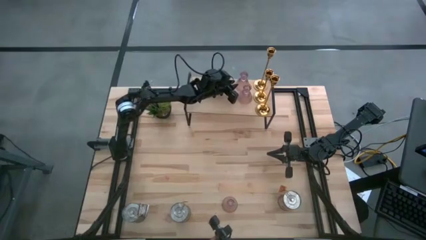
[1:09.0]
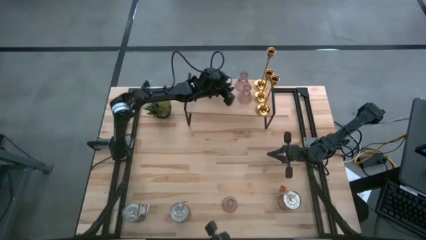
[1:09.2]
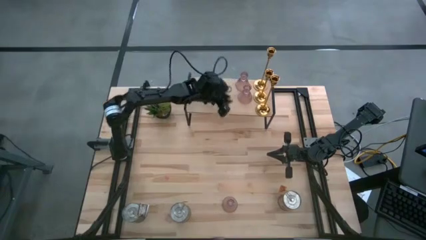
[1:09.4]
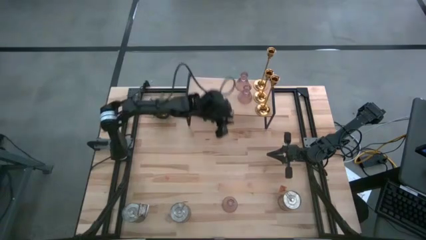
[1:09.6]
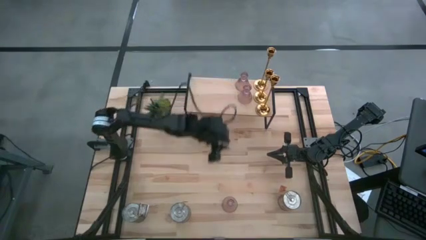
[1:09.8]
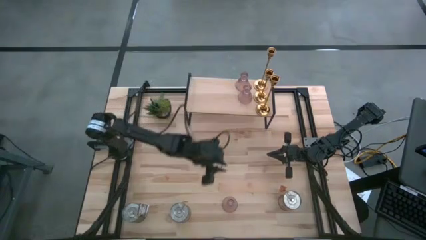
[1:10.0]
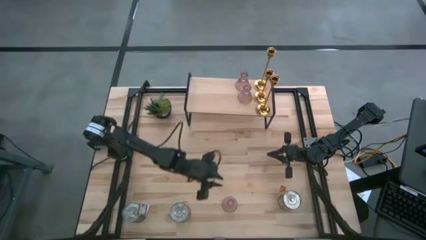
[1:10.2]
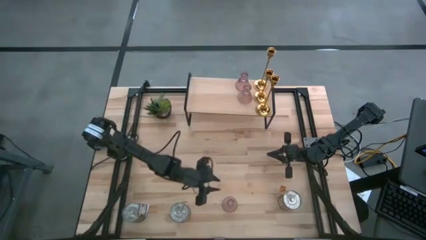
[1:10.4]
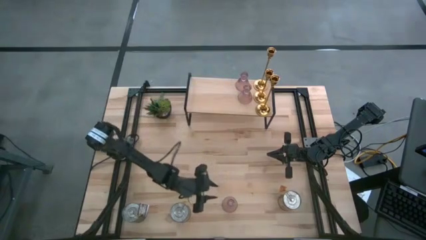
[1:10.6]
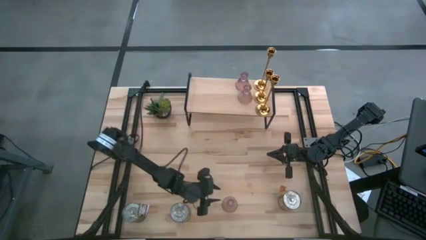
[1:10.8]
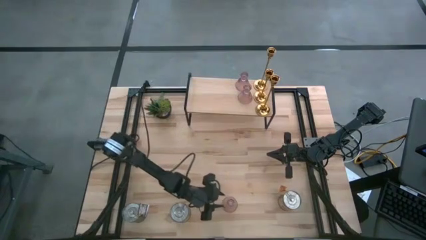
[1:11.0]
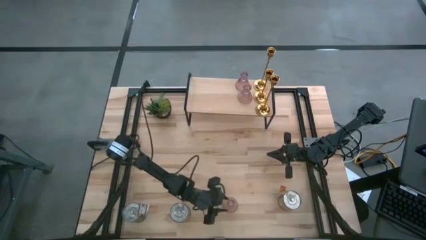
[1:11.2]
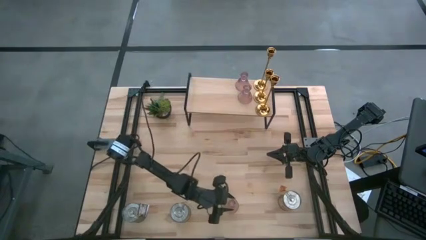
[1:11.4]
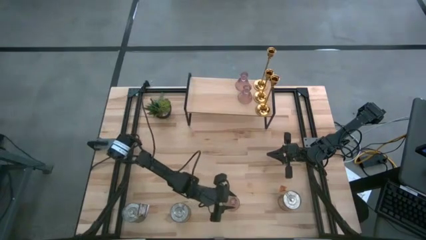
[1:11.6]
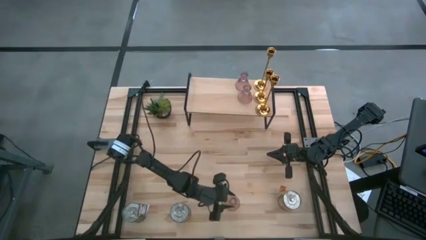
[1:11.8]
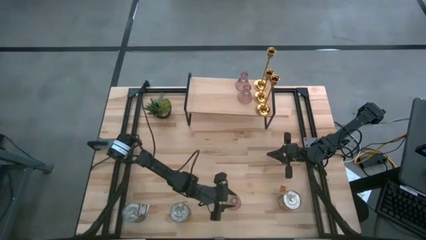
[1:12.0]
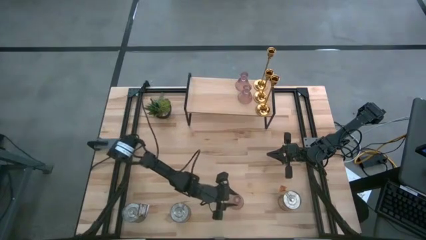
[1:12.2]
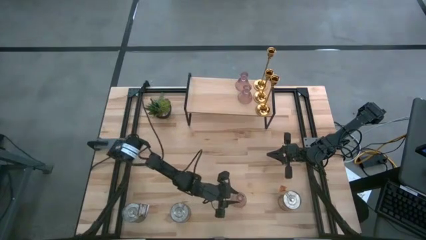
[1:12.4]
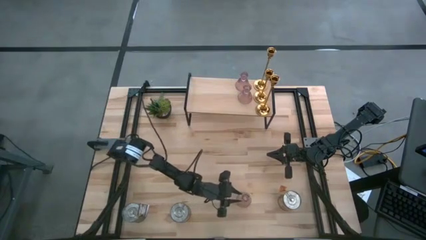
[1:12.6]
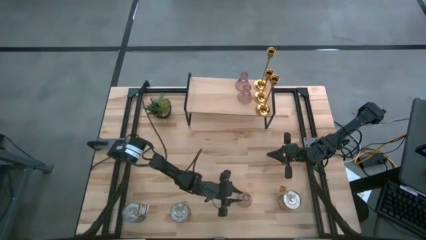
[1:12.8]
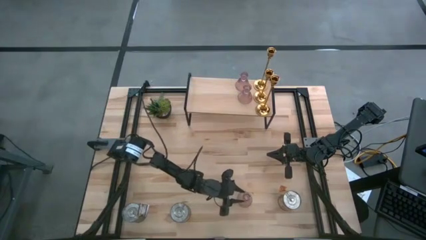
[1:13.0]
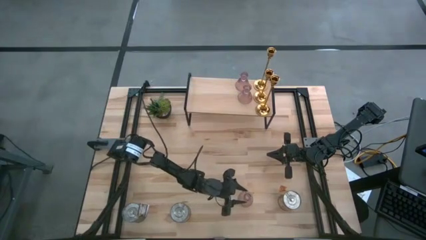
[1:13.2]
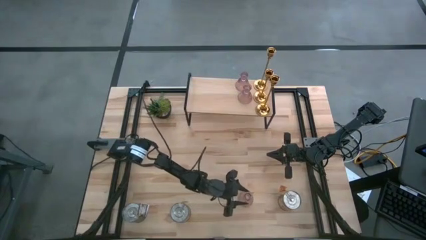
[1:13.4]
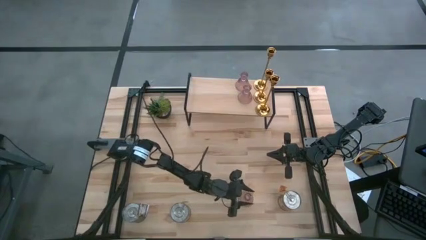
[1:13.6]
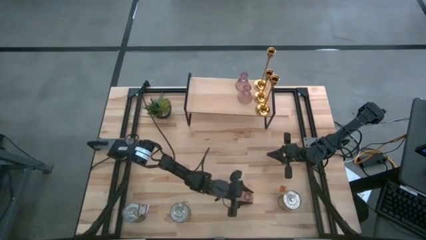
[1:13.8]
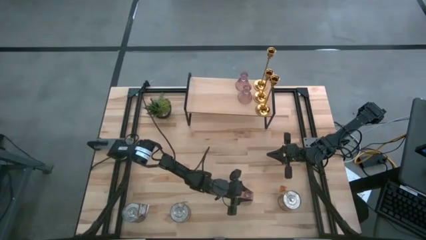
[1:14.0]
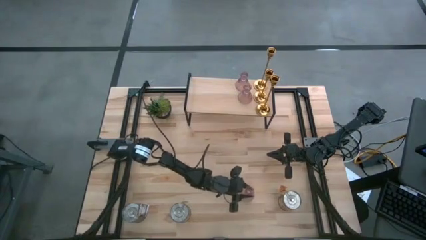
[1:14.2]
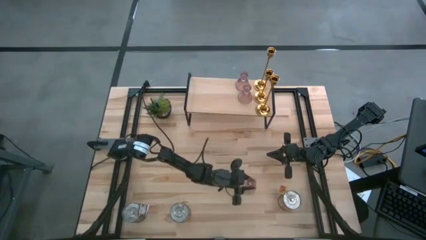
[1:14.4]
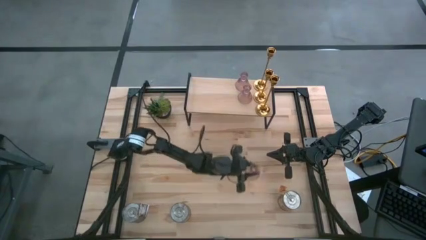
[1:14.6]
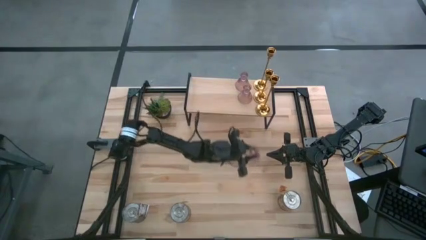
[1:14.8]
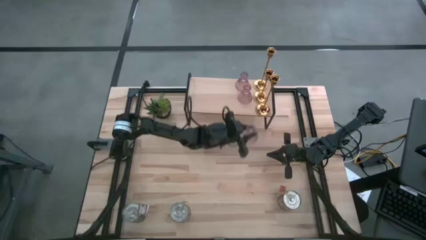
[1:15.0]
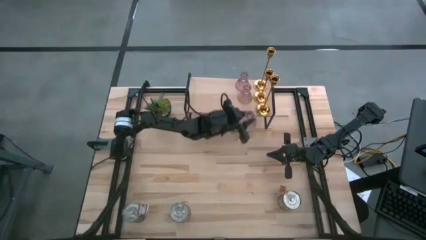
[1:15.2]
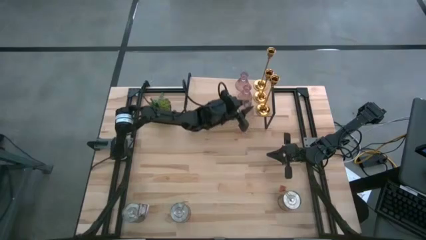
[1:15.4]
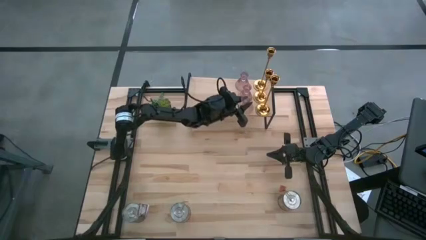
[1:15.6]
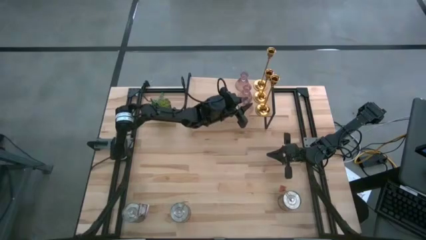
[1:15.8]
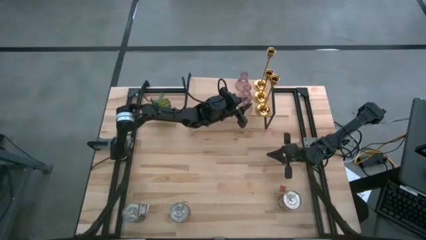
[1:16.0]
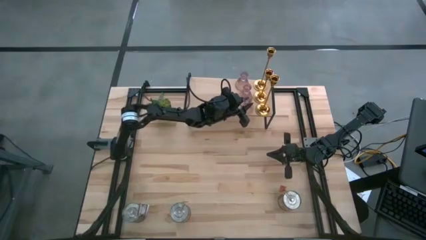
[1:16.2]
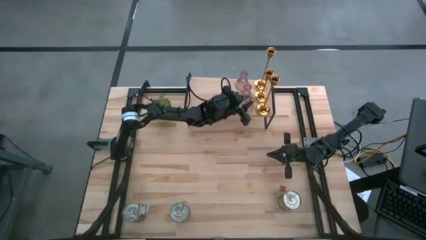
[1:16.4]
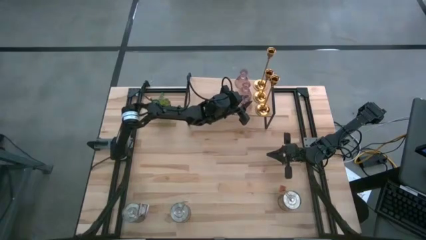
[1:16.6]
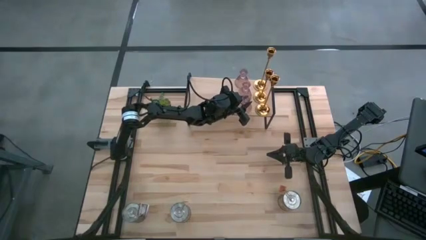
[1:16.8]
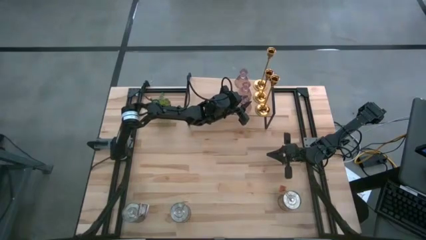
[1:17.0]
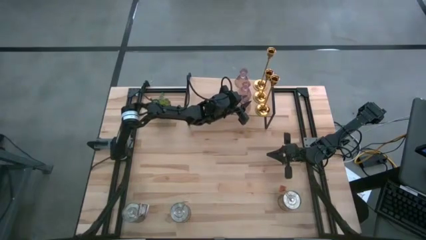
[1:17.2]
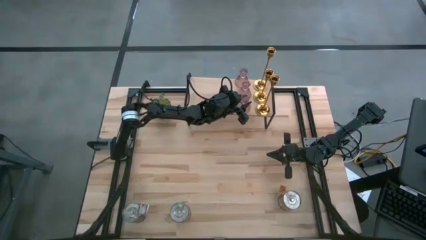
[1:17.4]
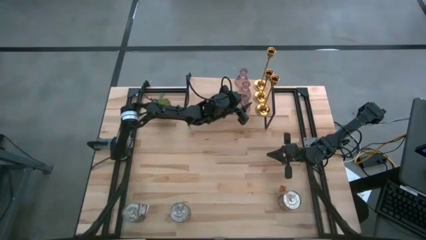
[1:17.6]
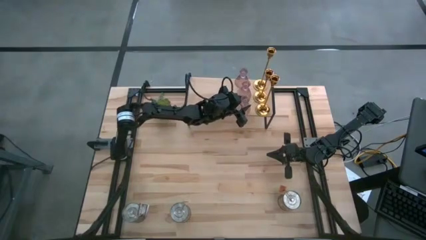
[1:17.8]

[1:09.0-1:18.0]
Task: Pick & Place candle stick holders
Align the red candle holder on the shelf with the red candle holders

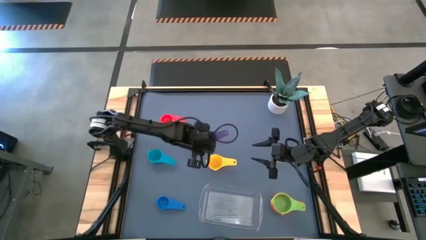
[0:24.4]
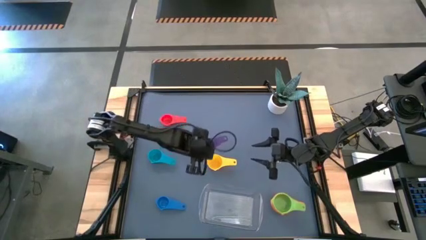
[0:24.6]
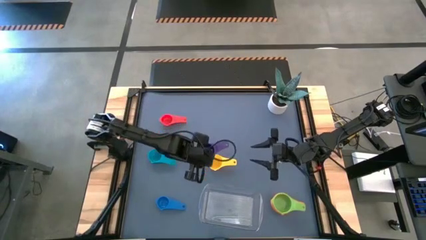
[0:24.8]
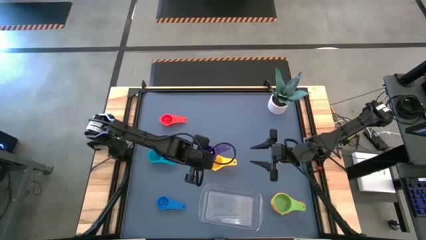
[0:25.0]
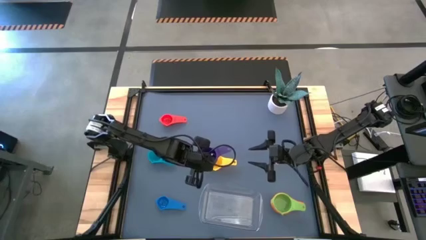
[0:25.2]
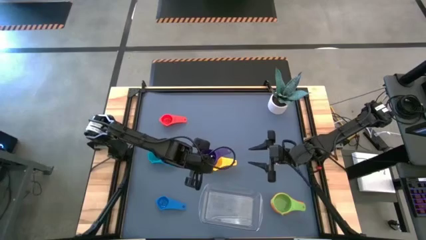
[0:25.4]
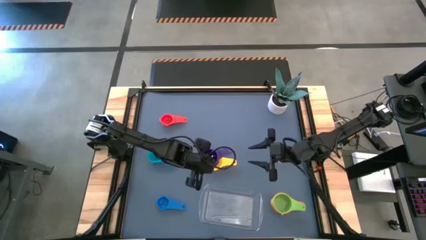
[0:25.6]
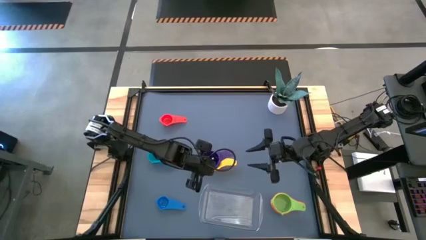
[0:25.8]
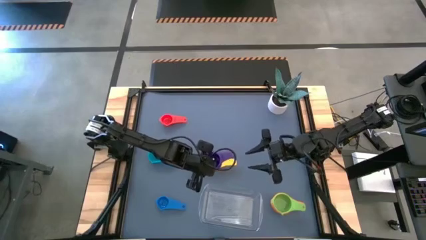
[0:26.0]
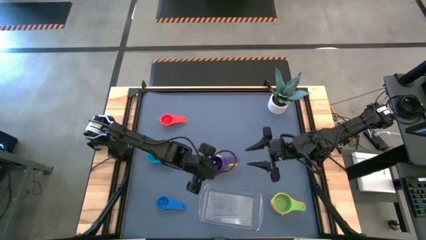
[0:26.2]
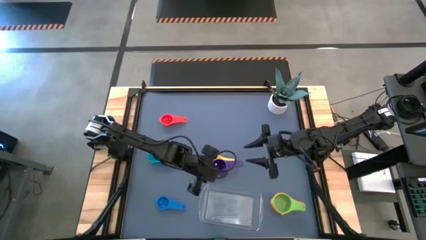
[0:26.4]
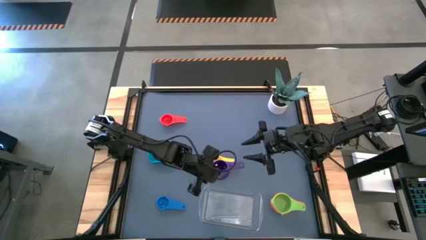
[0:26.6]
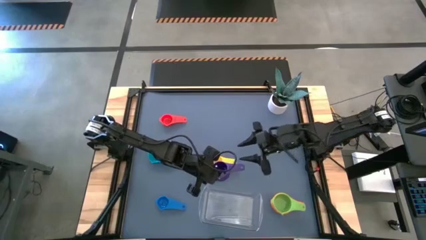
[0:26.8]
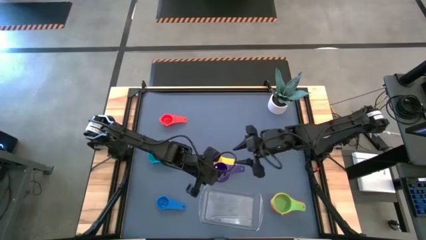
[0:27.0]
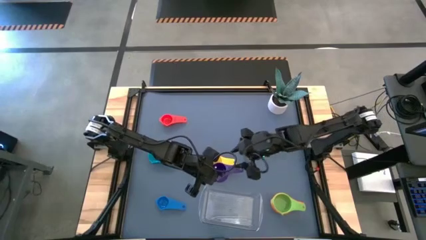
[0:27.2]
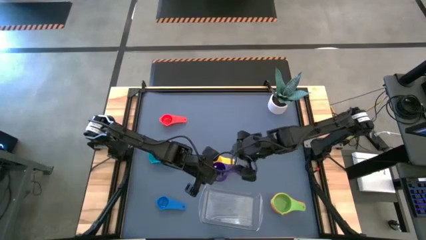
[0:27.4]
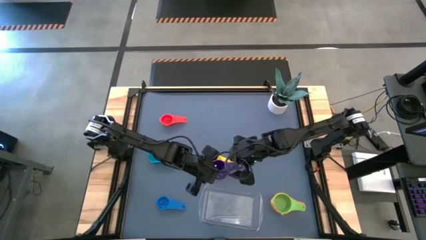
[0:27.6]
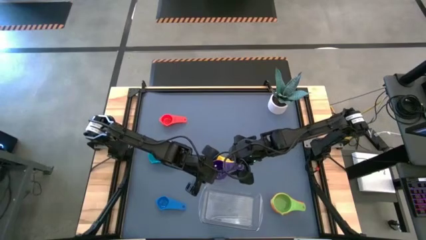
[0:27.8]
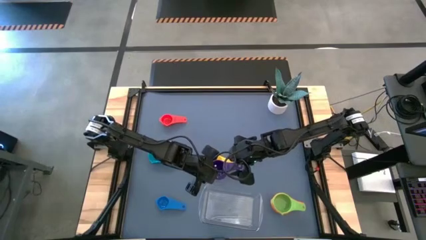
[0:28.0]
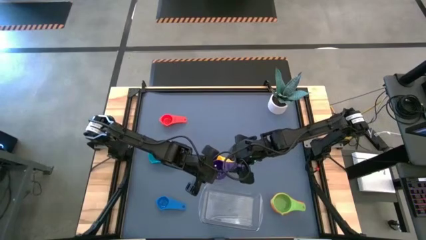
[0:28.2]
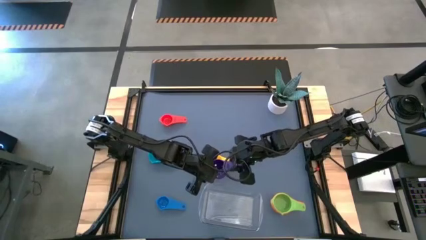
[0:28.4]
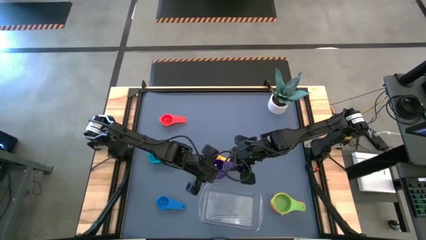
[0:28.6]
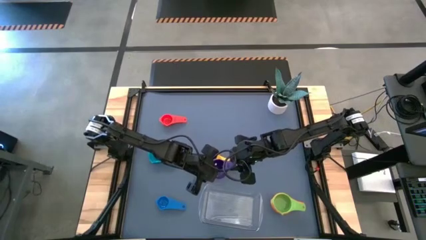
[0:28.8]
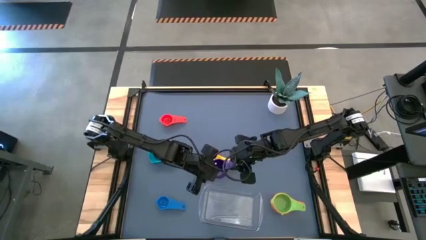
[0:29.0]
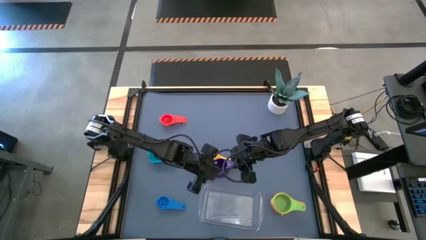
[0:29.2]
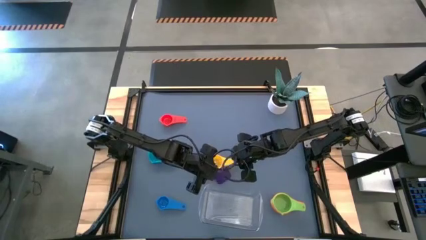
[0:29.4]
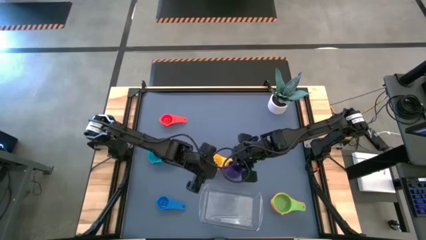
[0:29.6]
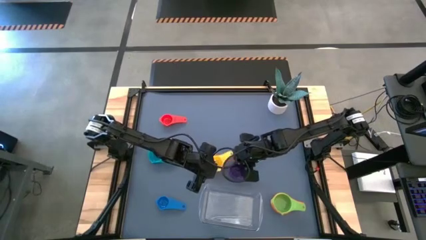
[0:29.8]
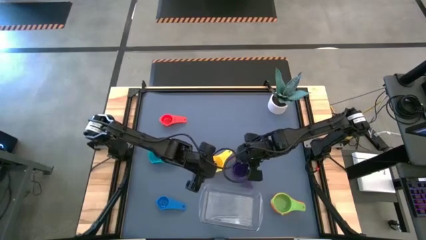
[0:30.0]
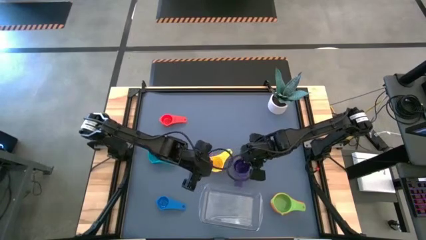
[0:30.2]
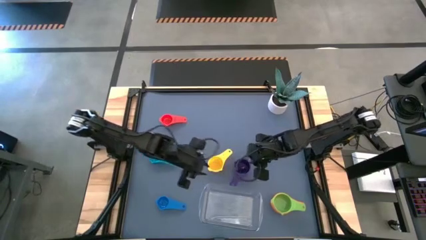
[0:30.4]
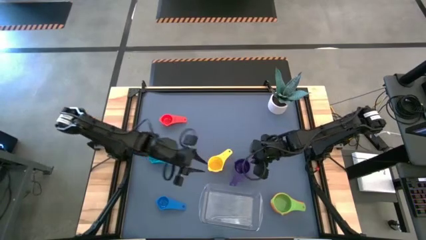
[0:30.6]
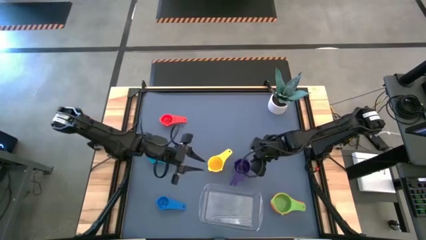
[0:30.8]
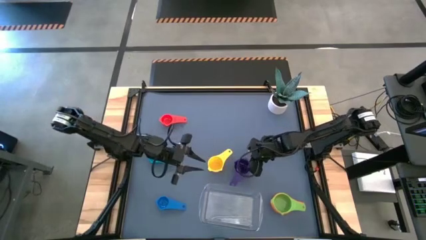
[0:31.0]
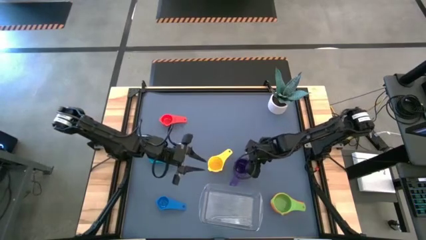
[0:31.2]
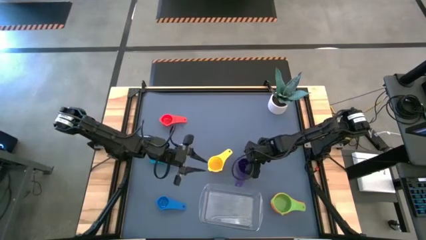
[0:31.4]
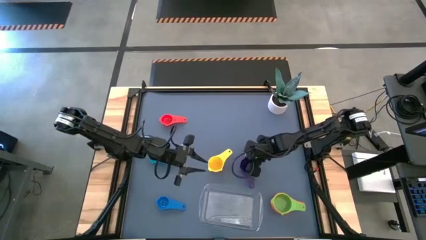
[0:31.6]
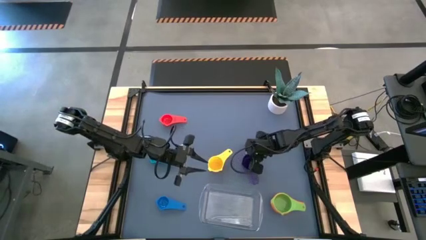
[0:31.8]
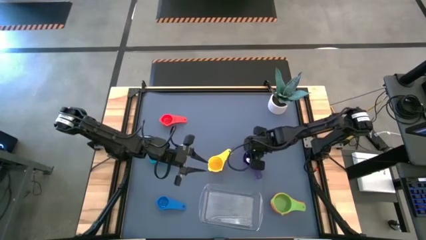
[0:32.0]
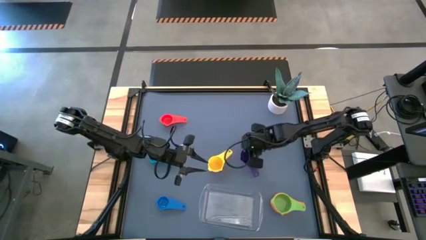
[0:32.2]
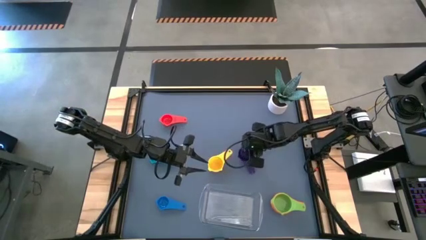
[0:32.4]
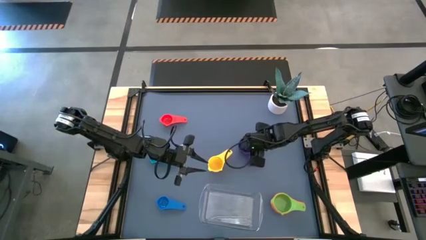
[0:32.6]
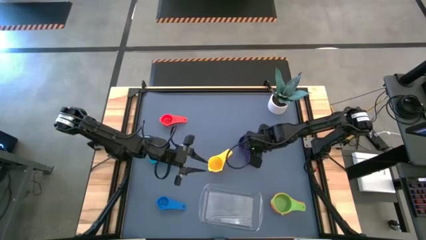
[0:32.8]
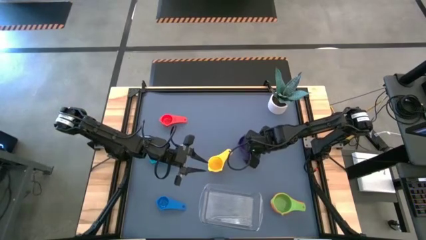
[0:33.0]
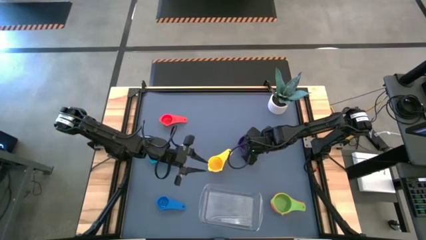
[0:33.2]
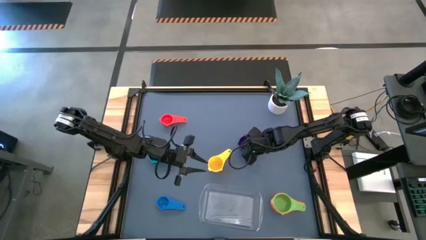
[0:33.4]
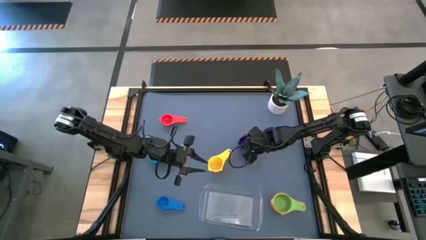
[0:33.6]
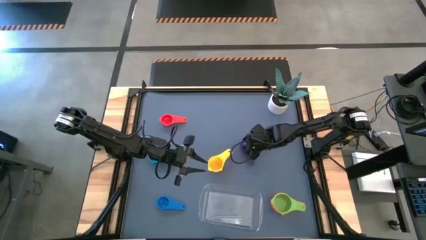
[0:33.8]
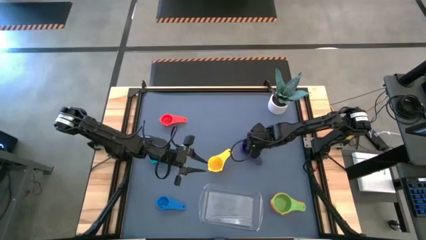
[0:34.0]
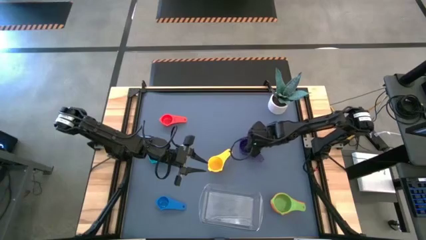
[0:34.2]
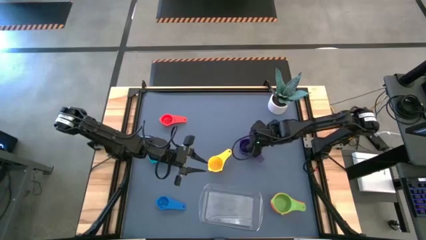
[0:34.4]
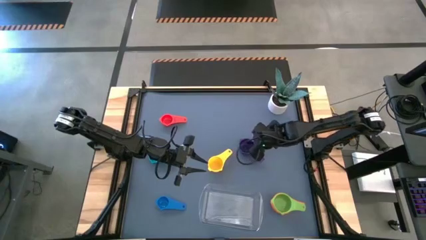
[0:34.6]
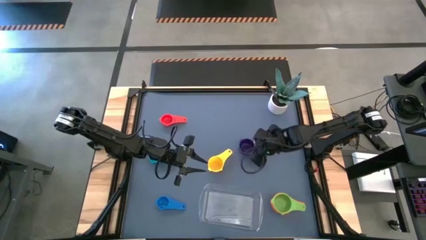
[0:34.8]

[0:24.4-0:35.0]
Task: Nest measuring cups in basket
Stack the violet measuring cup on top of the green measuring cup
